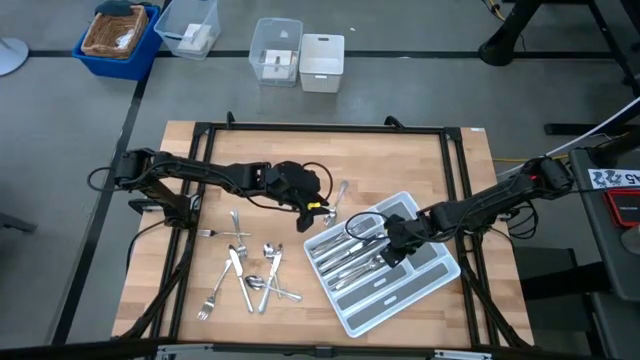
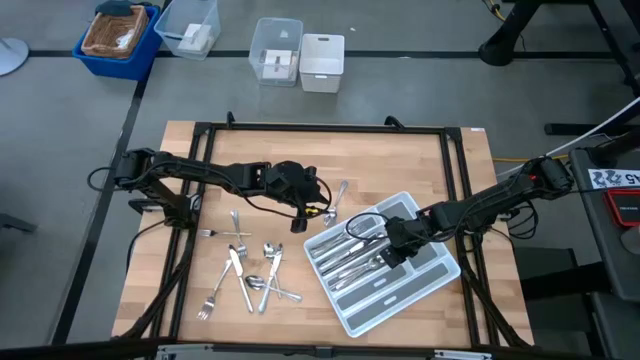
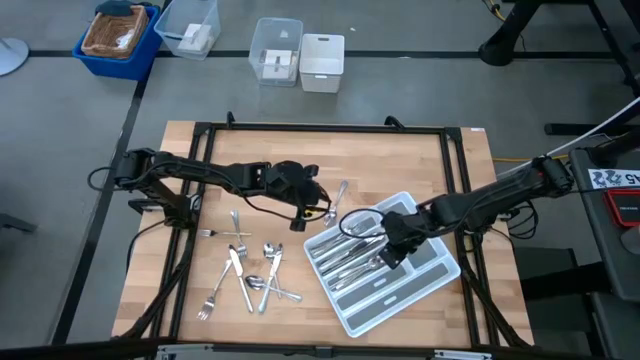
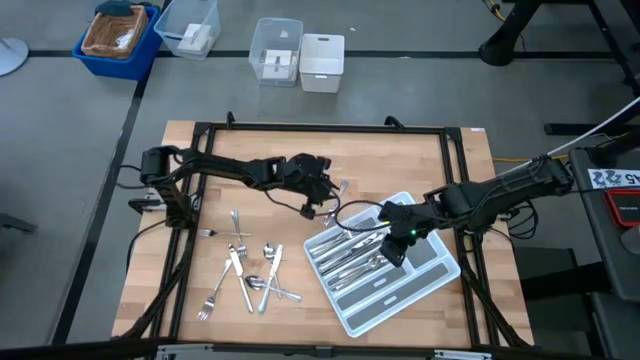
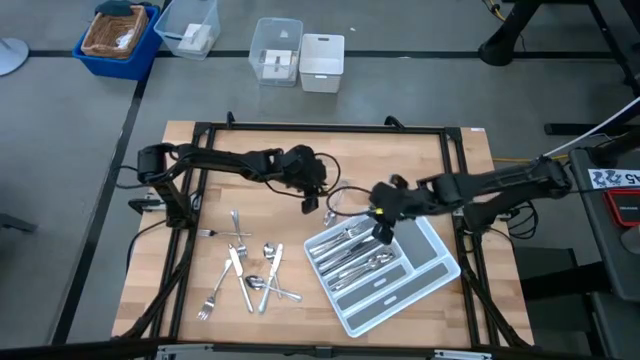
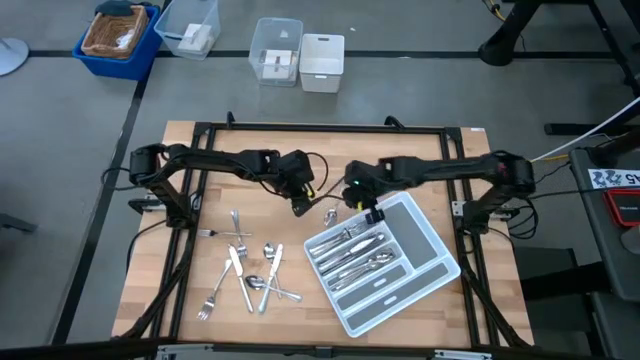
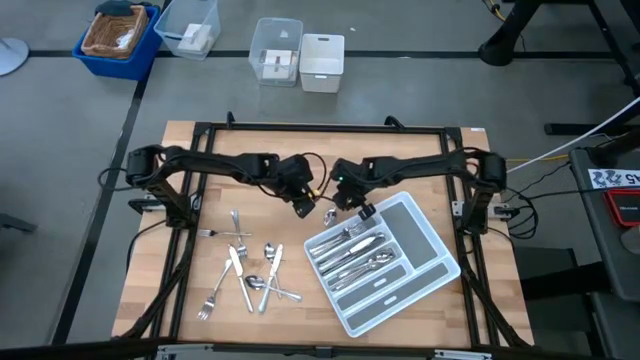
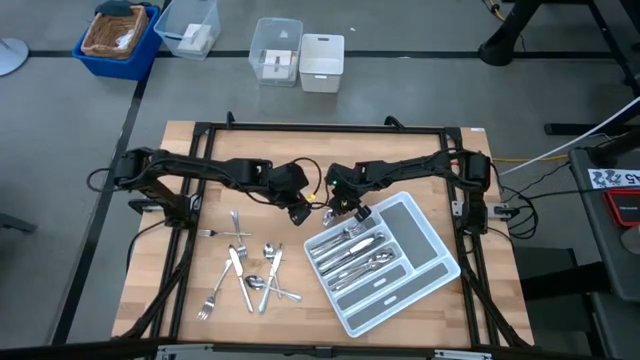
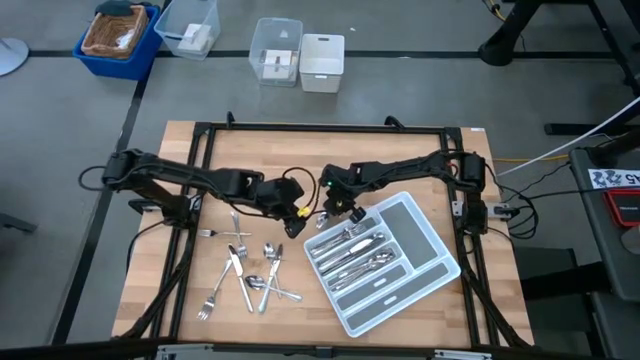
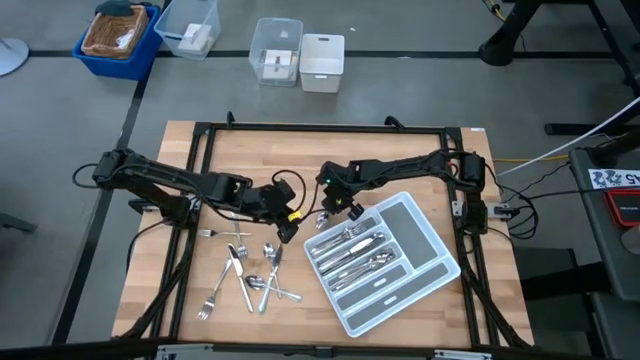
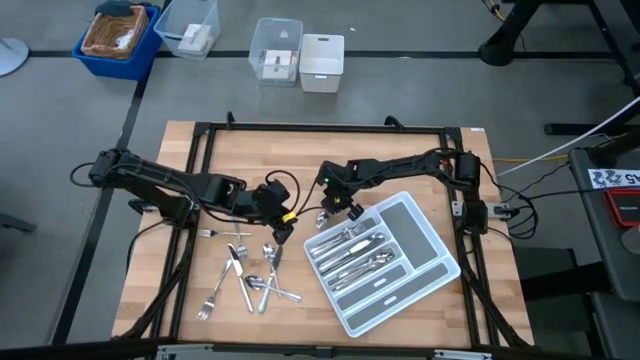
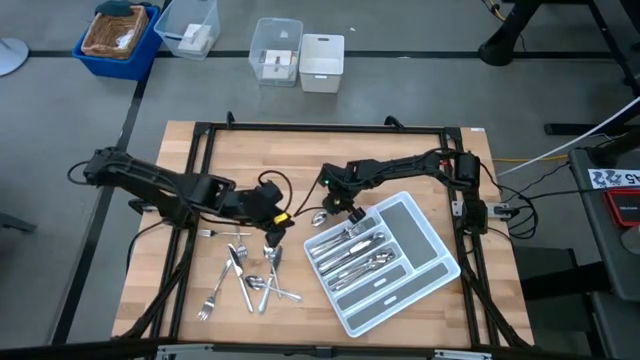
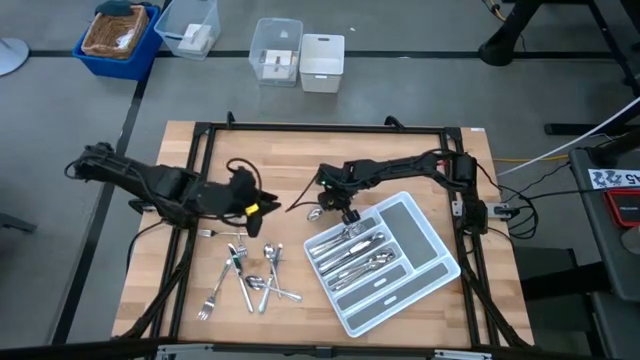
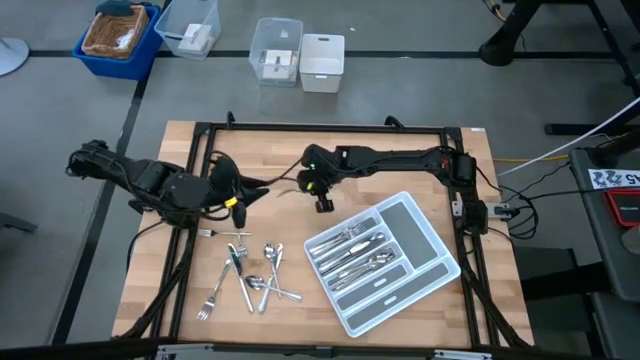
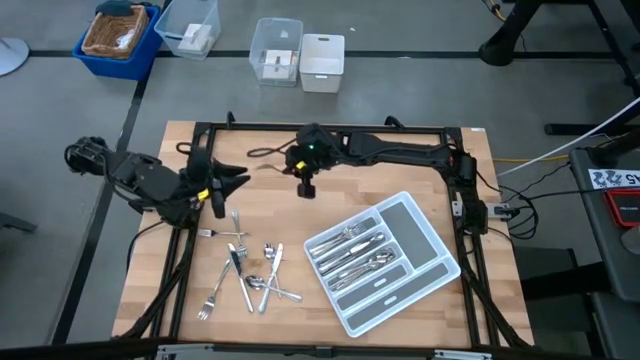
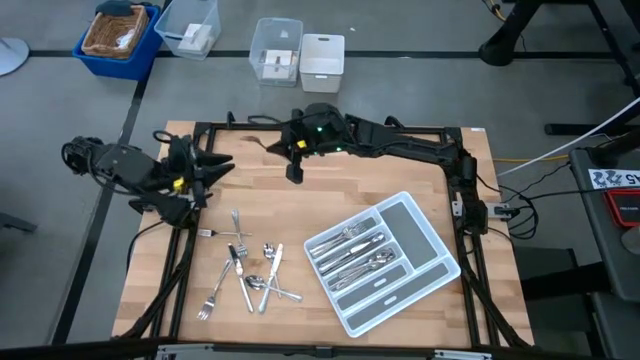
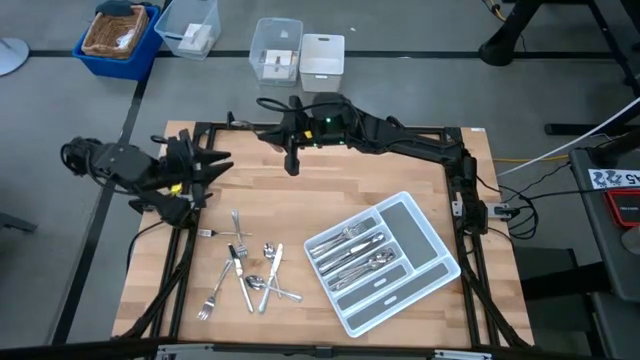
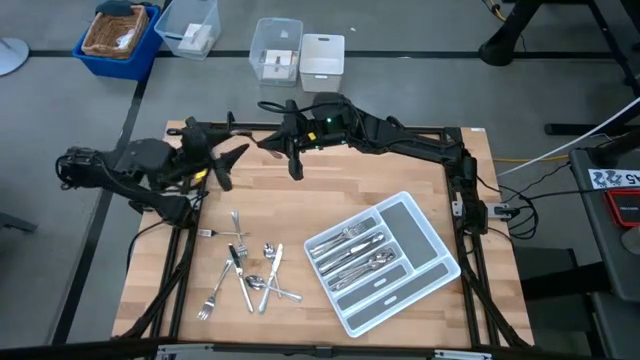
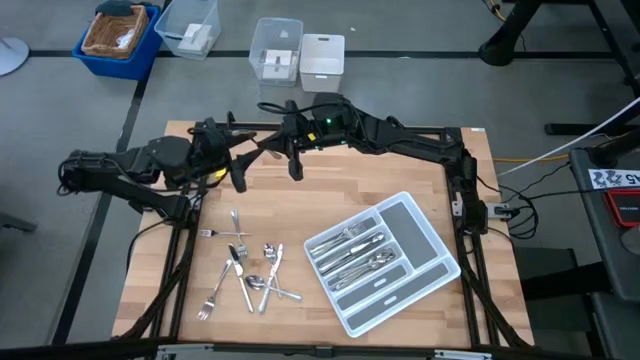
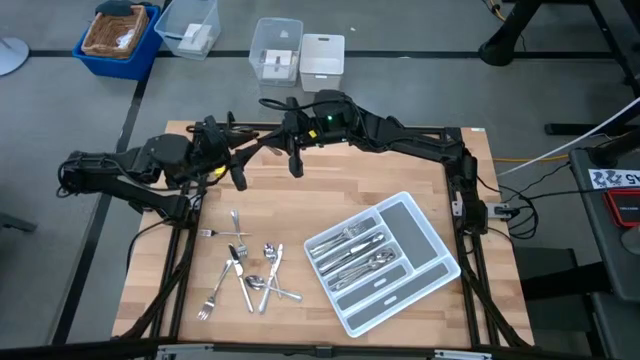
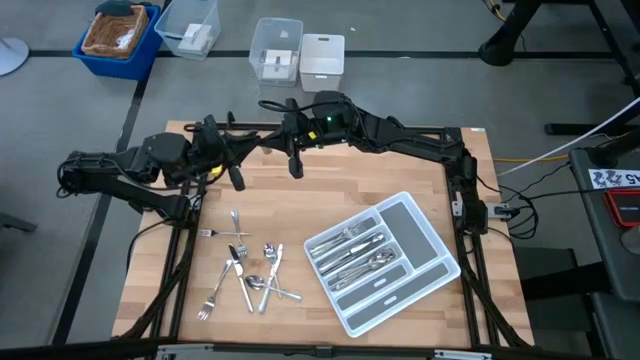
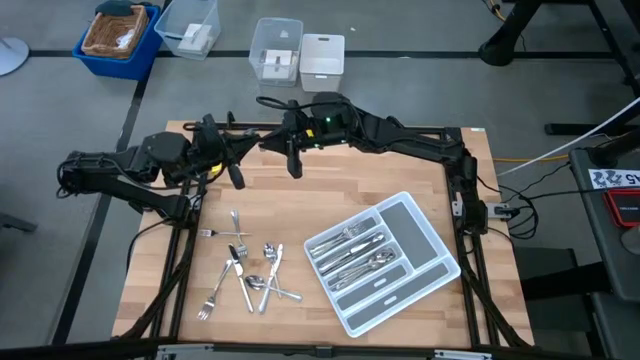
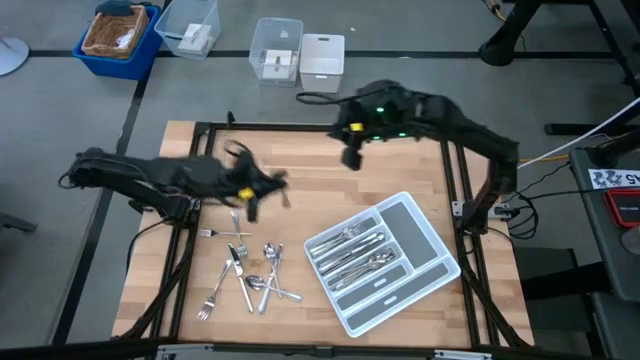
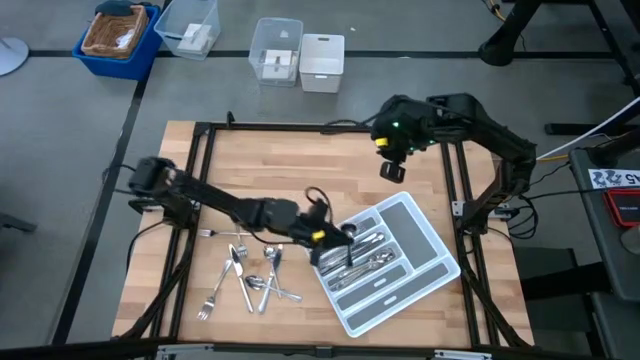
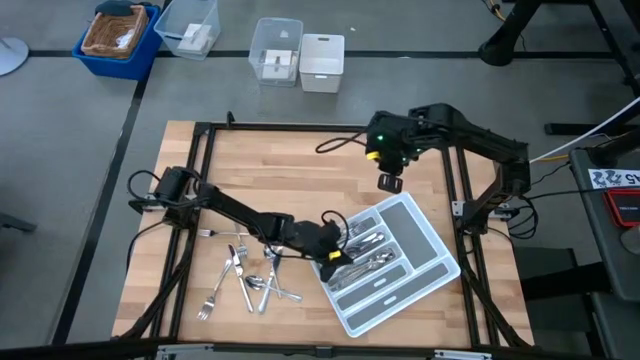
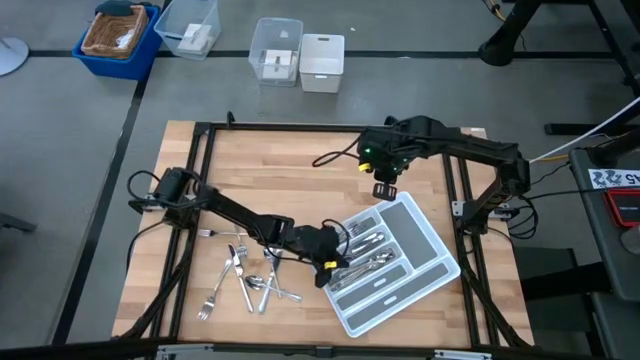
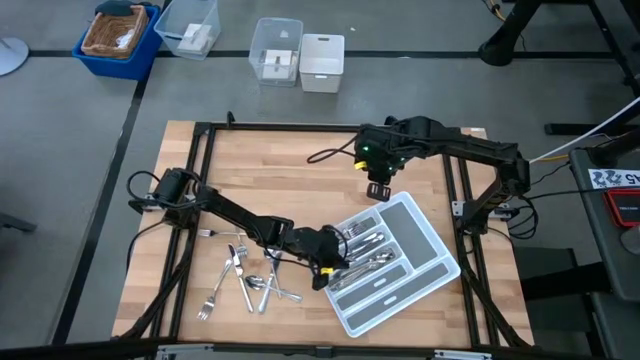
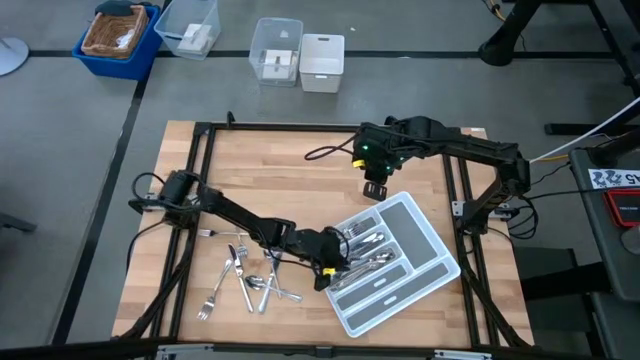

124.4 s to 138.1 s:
Task: Sort silverware
Put the silver spoon into the silverware tray

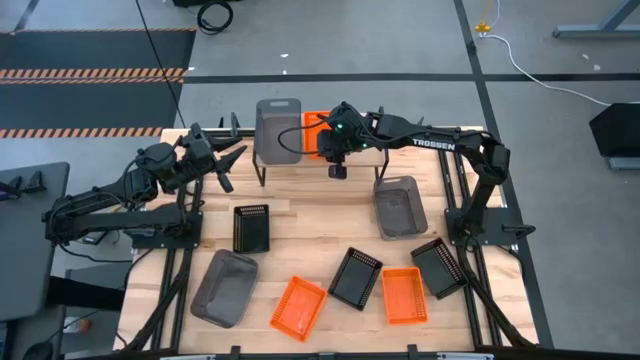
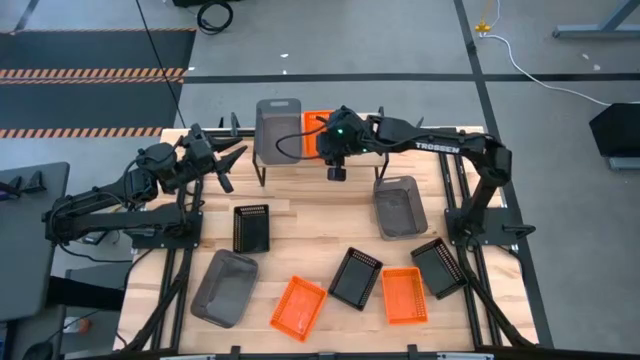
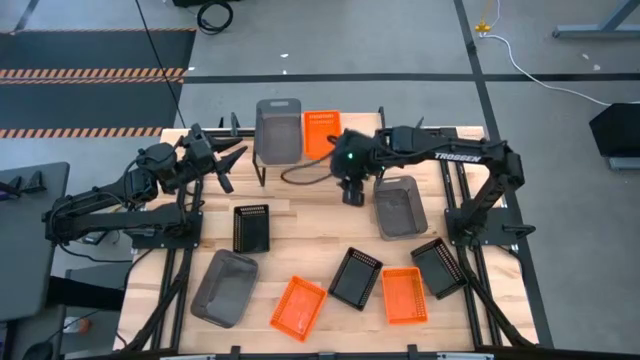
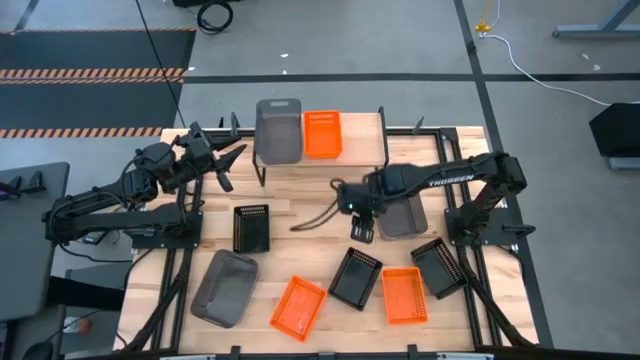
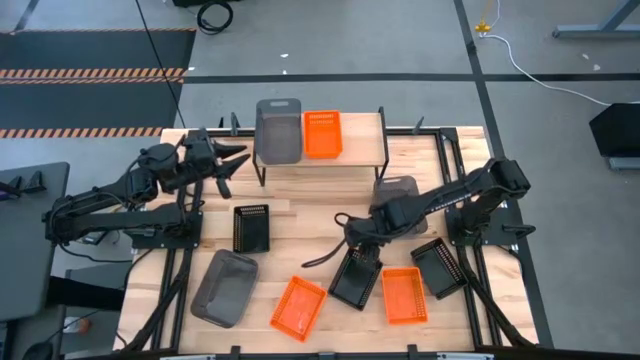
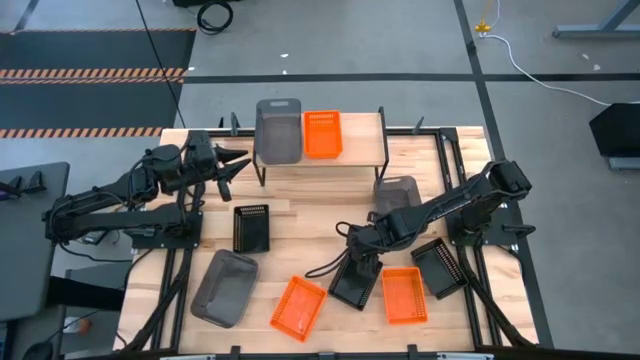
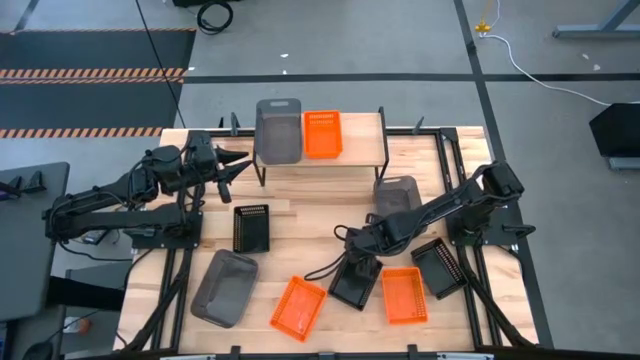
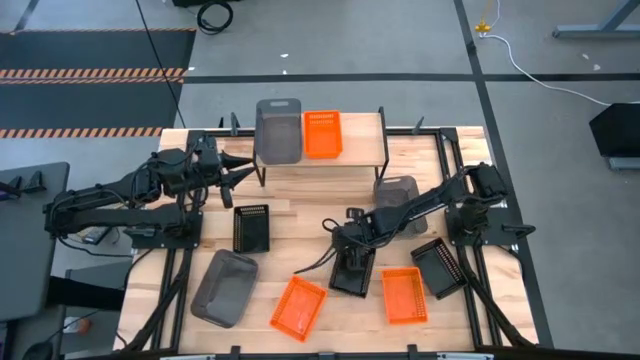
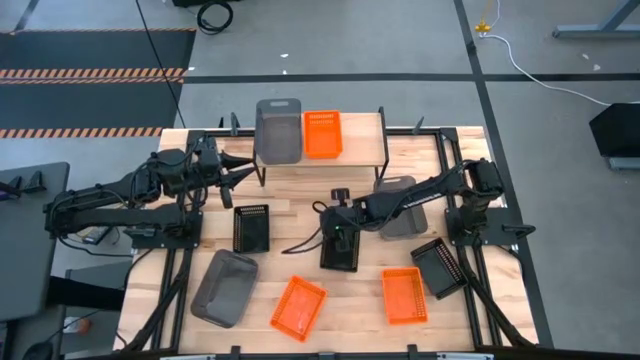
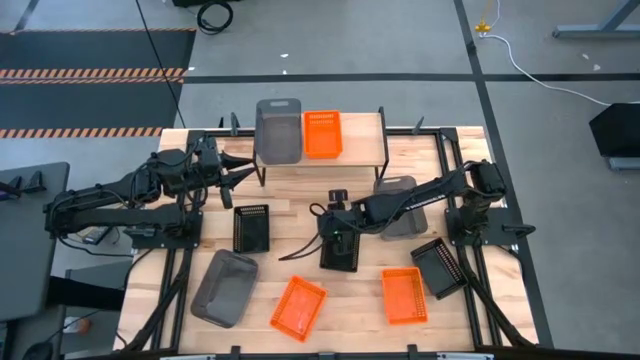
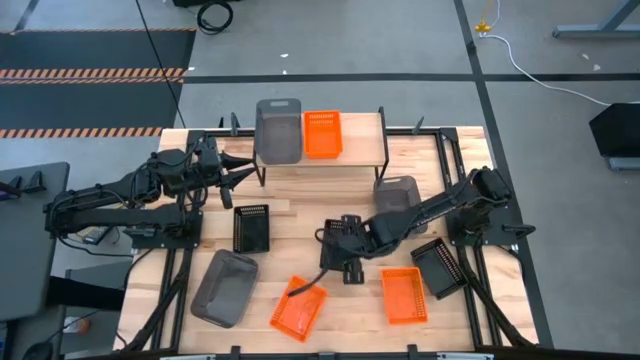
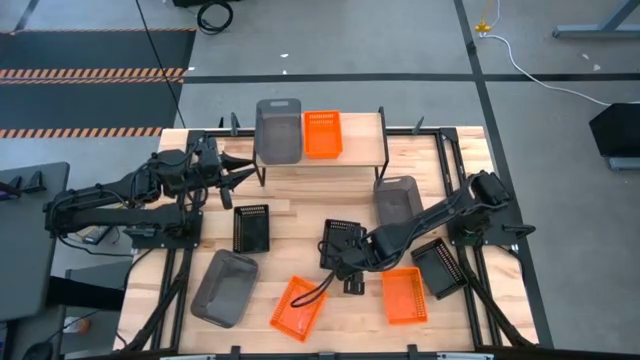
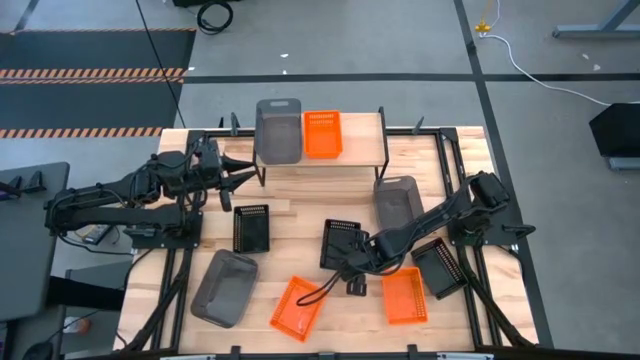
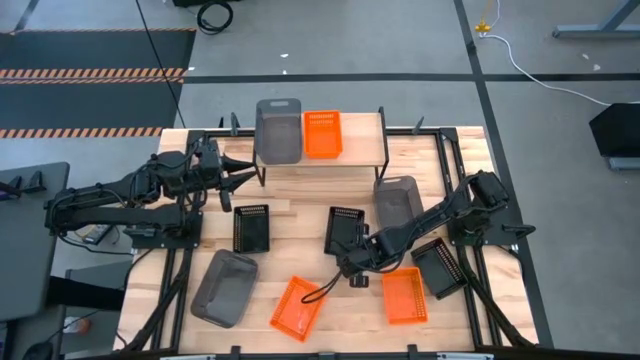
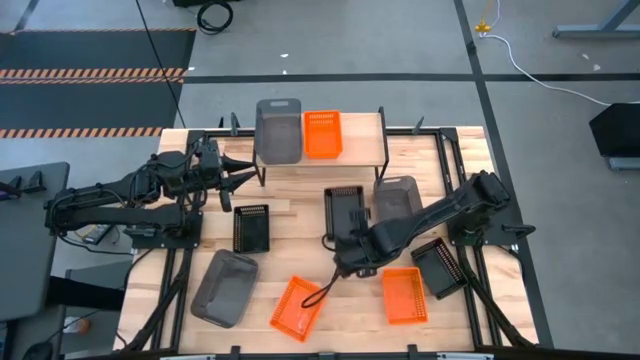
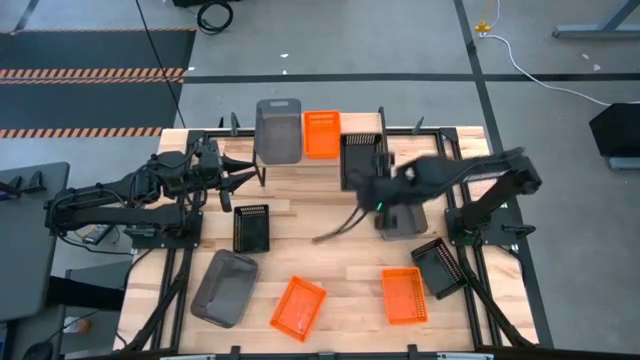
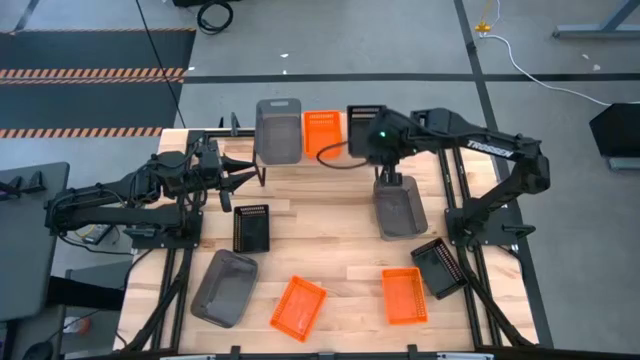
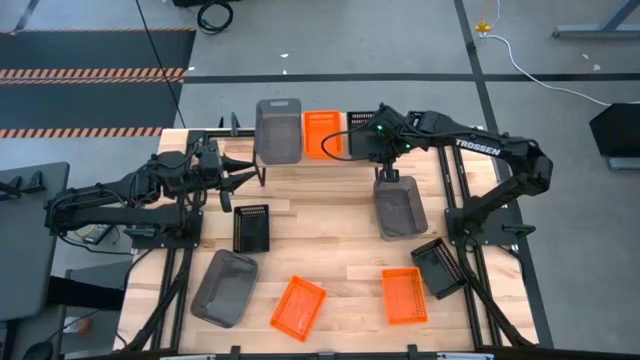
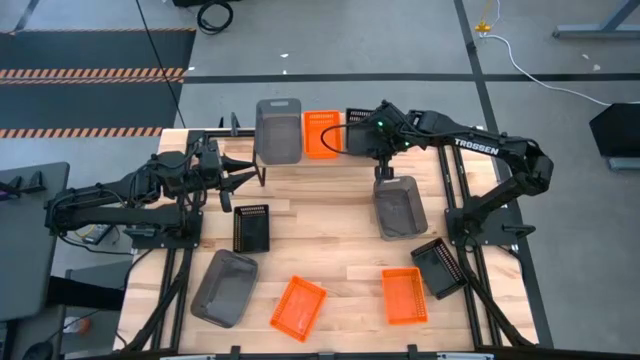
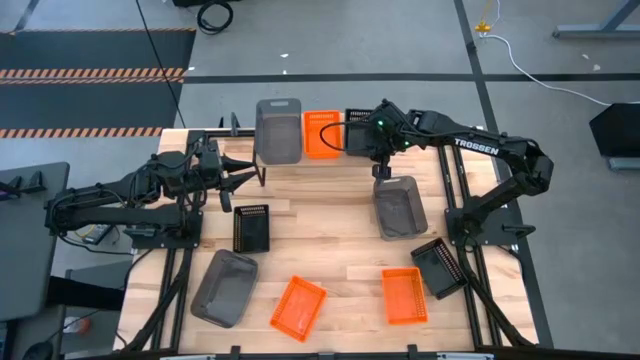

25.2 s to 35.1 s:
Task: Stack baskets on shelf by color
Put the middle black basket on the shelf
